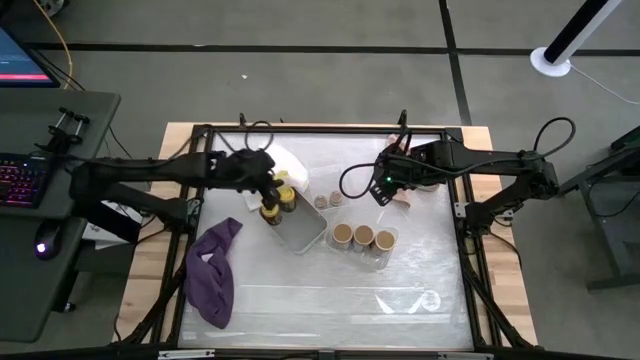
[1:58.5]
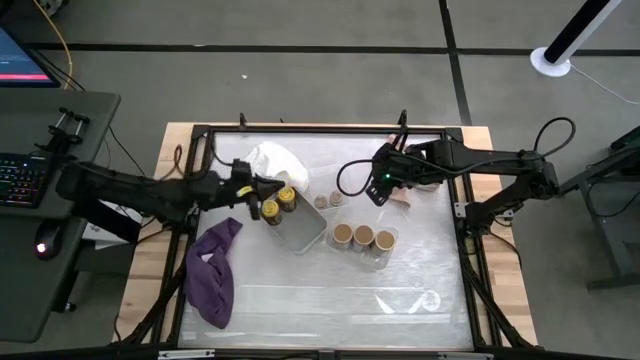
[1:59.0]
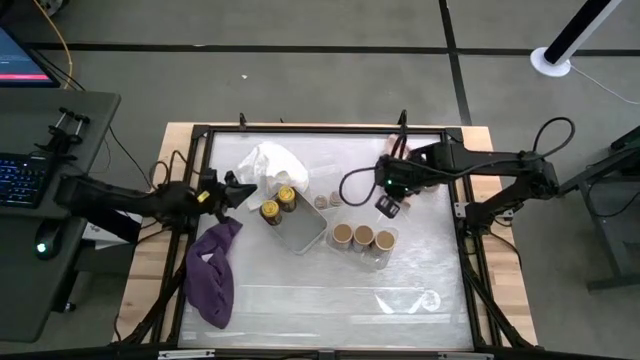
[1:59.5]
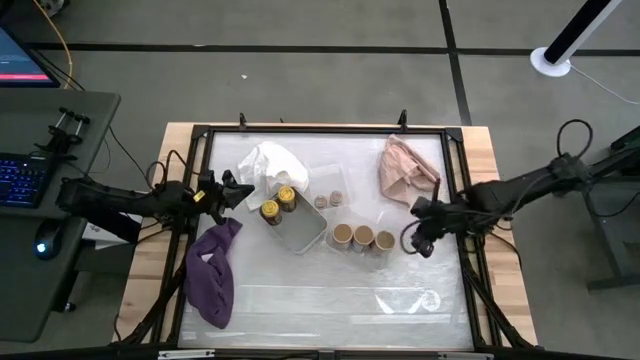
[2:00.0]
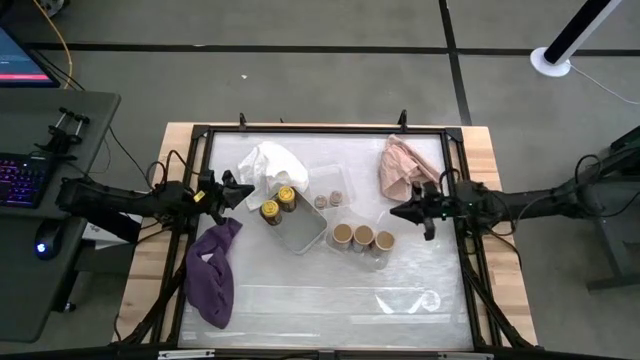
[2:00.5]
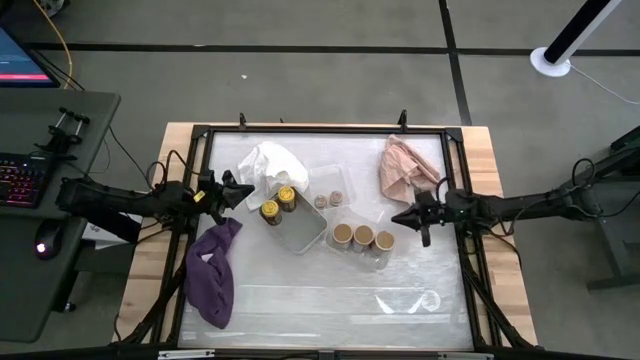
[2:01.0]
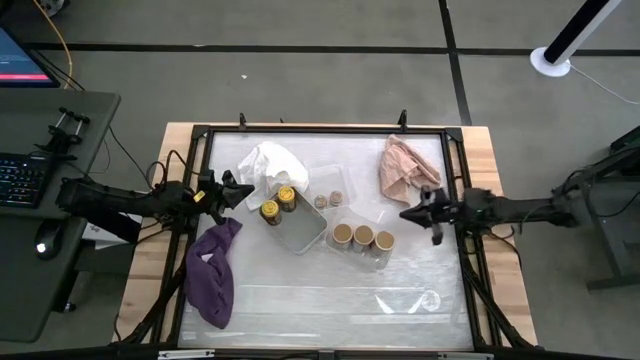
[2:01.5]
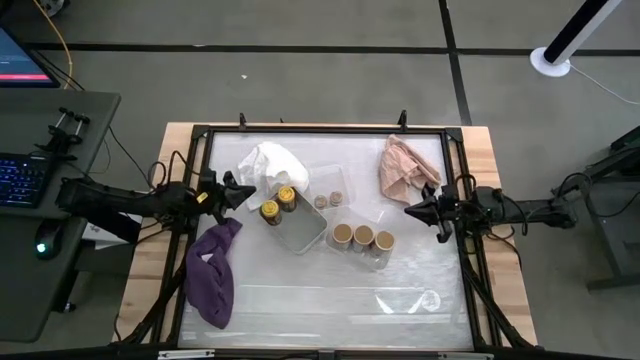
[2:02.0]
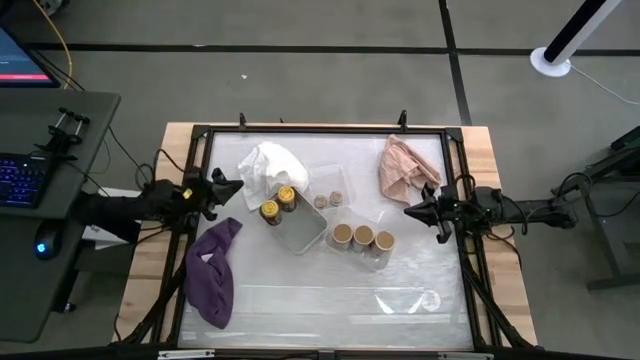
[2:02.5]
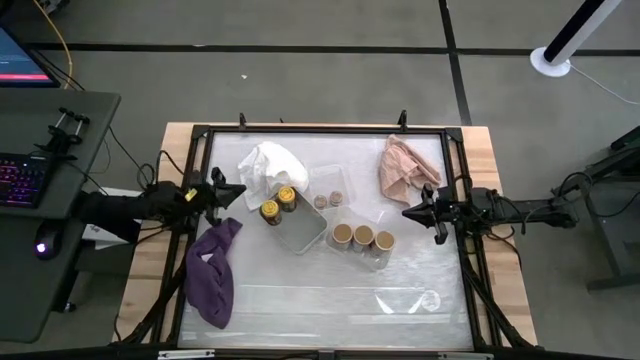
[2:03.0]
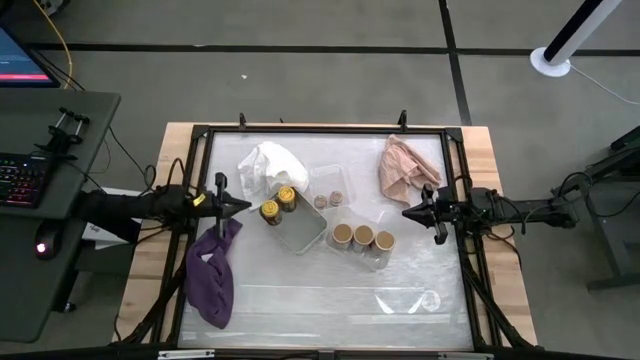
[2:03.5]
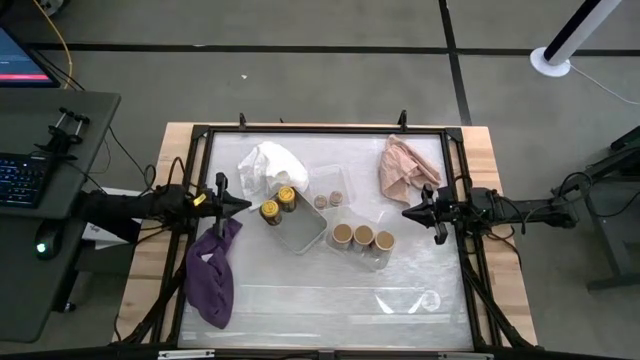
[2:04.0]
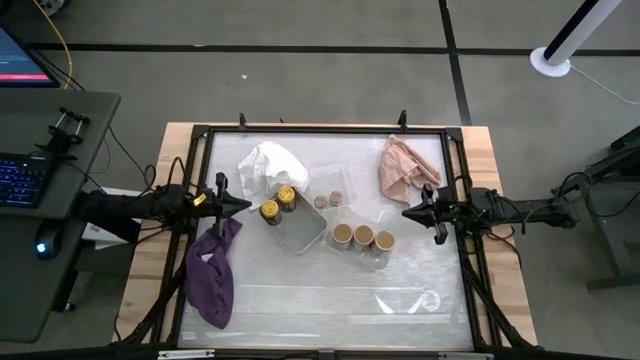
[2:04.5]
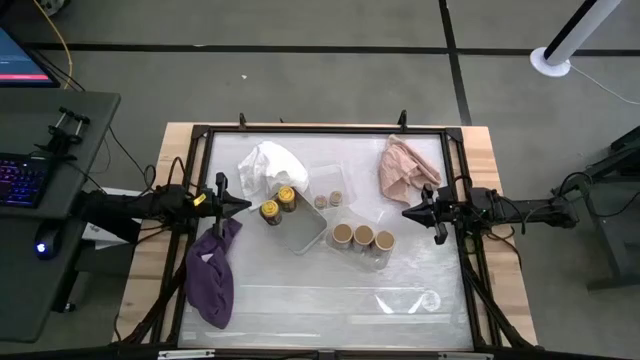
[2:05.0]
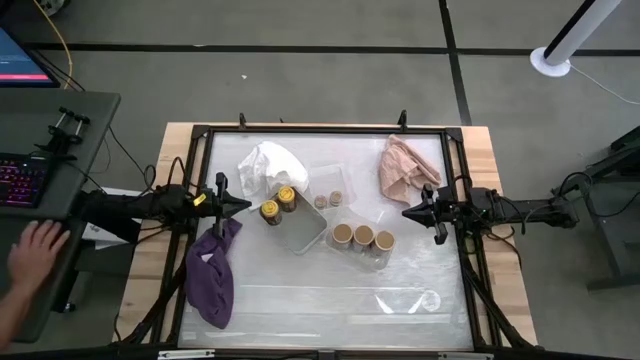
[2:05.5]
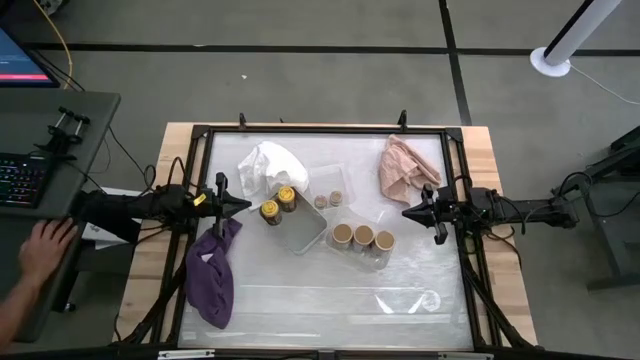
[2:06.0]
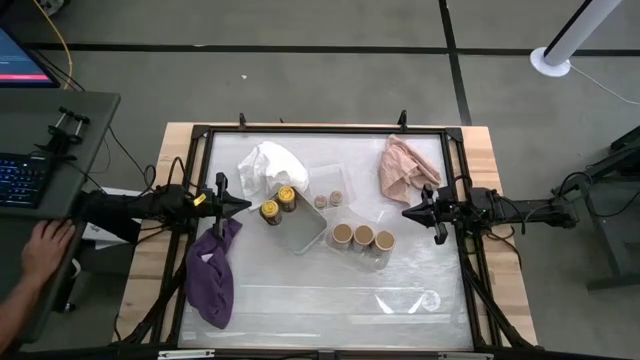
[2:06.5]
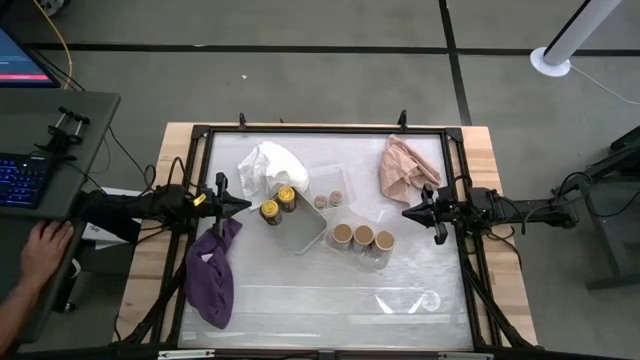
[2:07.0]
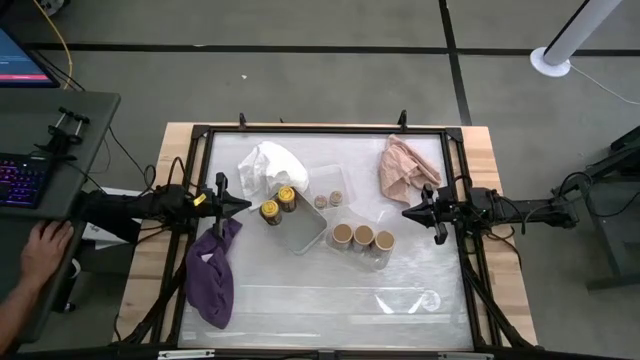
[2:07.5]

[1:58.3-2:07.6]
Task: Sort spices by type
Return to Home Position

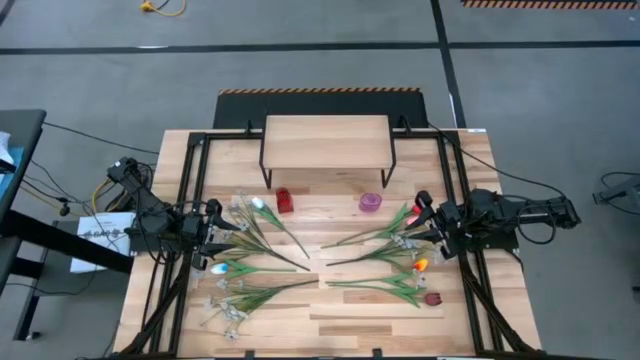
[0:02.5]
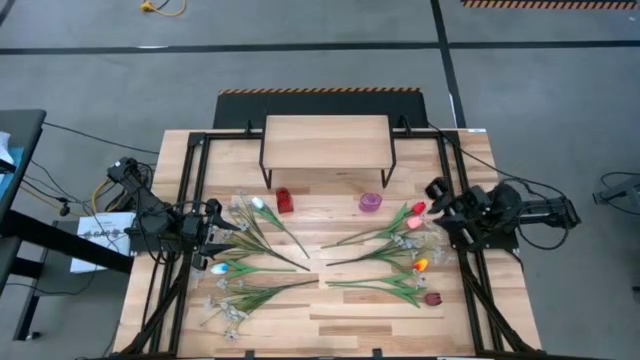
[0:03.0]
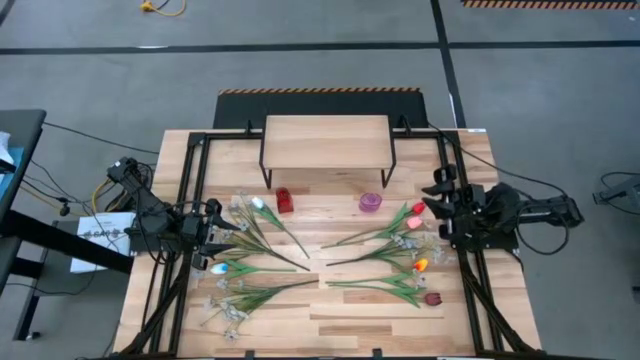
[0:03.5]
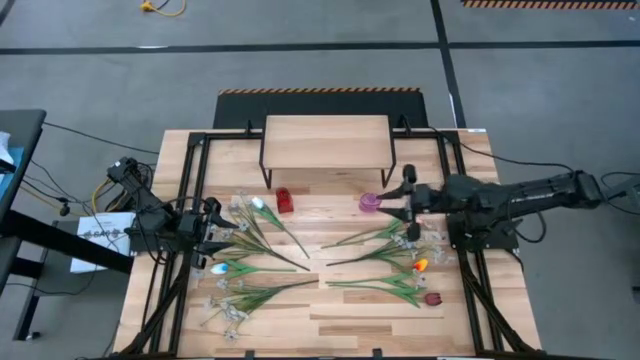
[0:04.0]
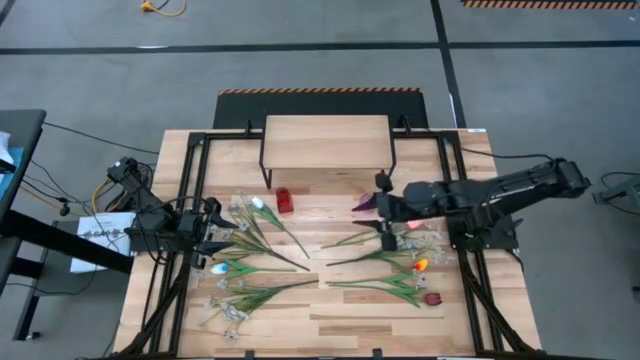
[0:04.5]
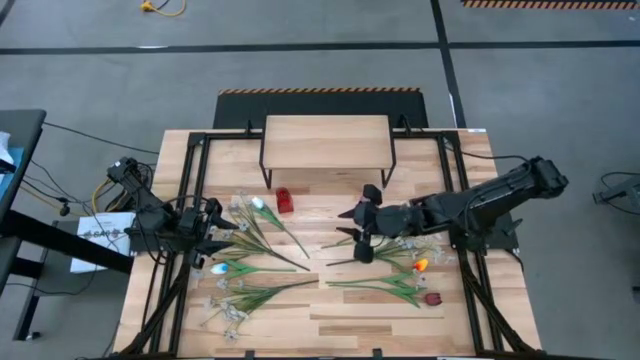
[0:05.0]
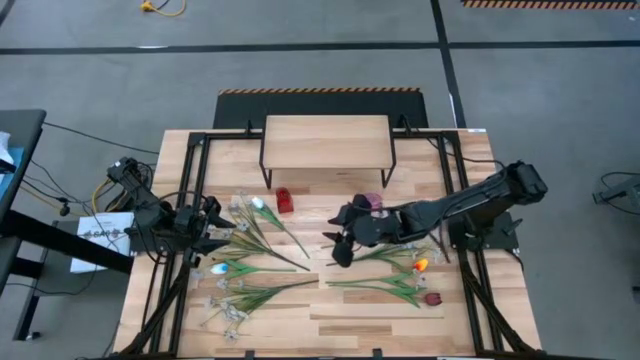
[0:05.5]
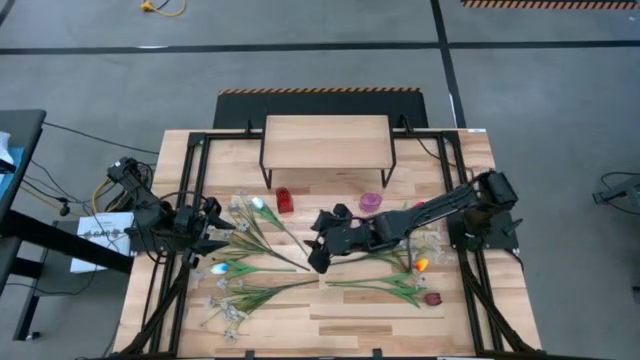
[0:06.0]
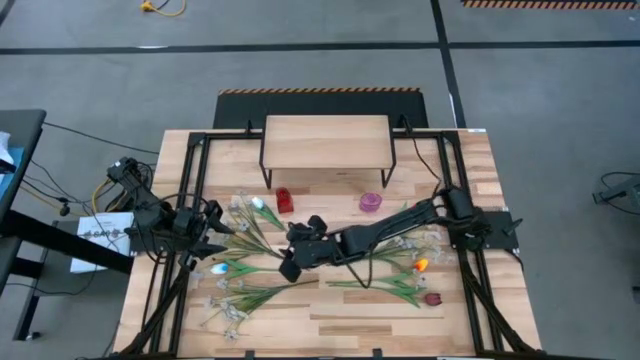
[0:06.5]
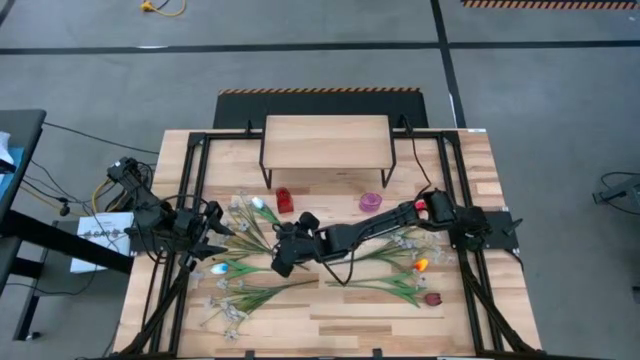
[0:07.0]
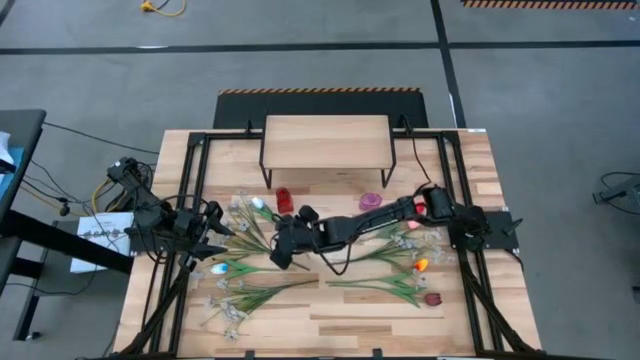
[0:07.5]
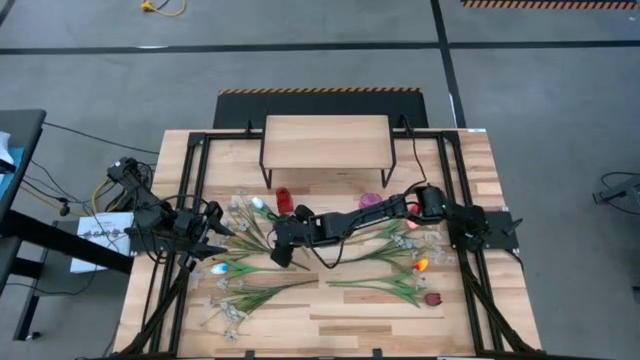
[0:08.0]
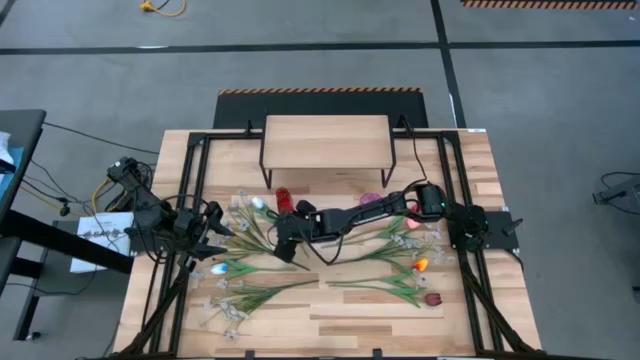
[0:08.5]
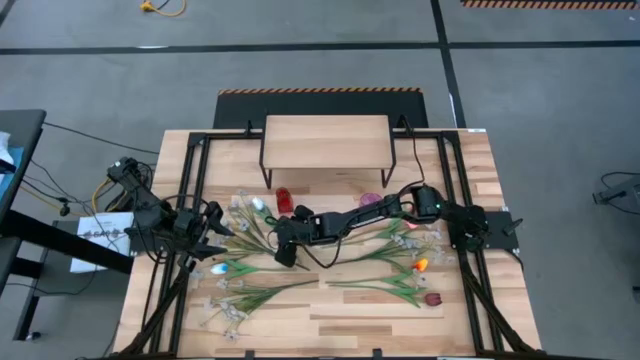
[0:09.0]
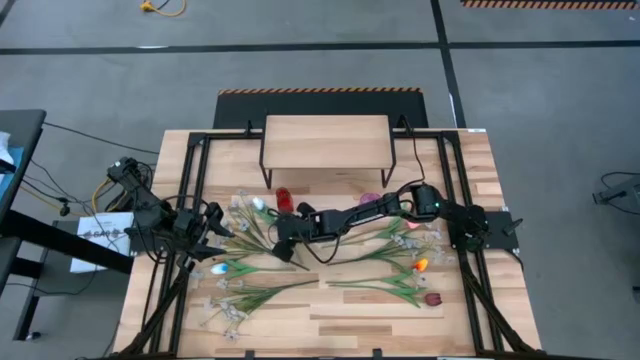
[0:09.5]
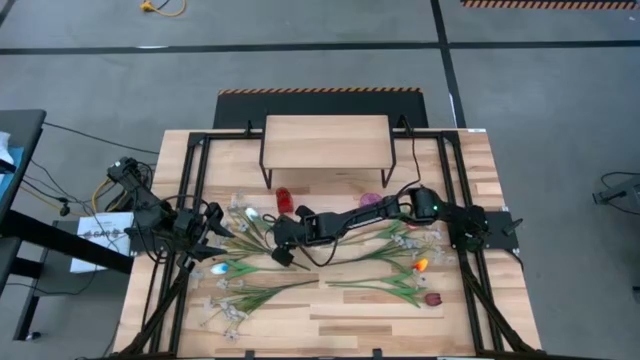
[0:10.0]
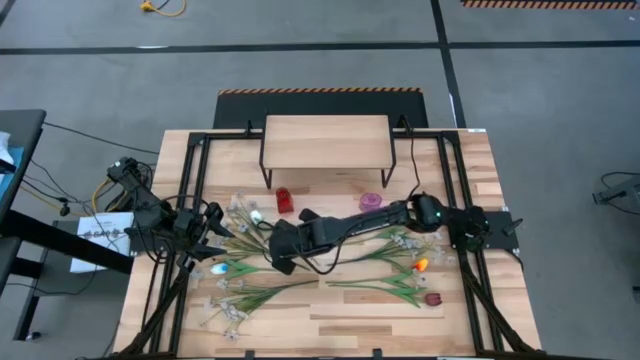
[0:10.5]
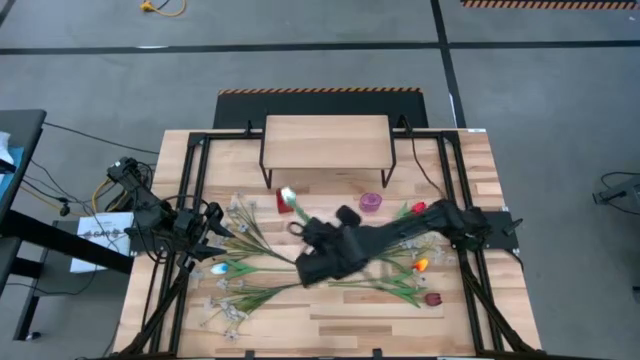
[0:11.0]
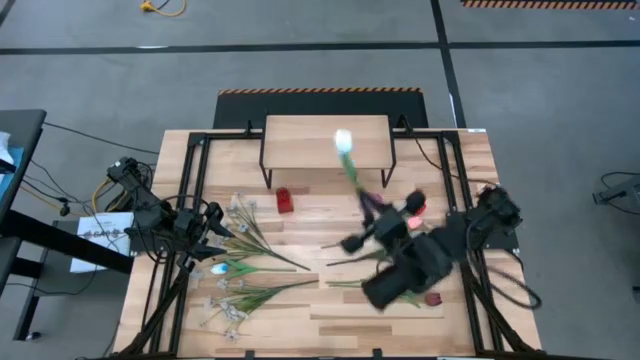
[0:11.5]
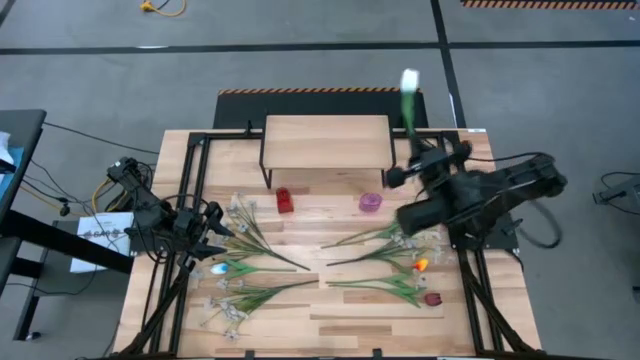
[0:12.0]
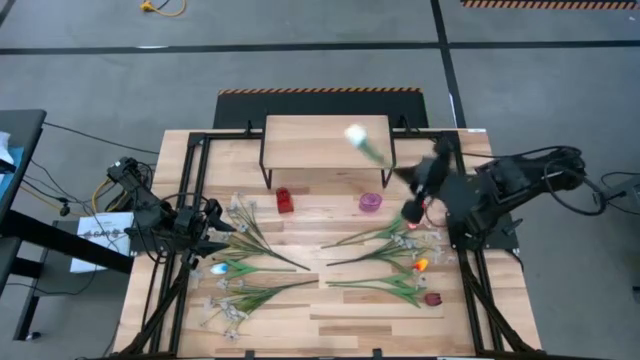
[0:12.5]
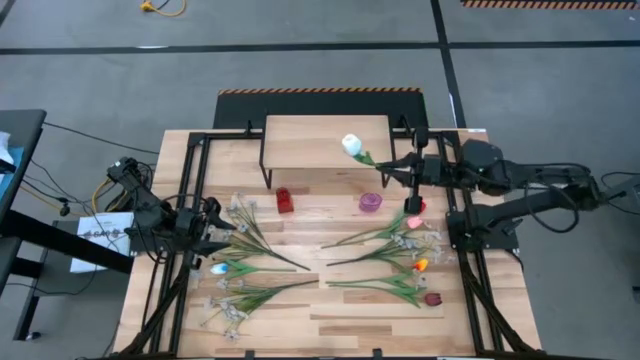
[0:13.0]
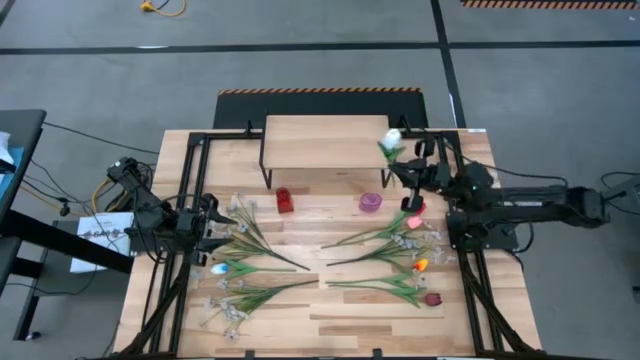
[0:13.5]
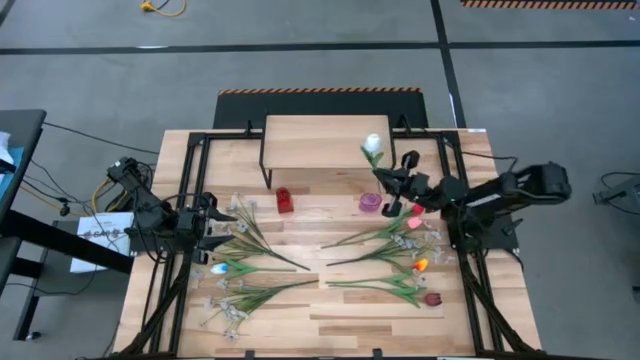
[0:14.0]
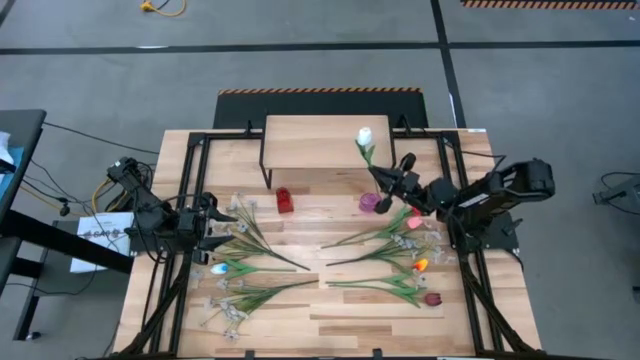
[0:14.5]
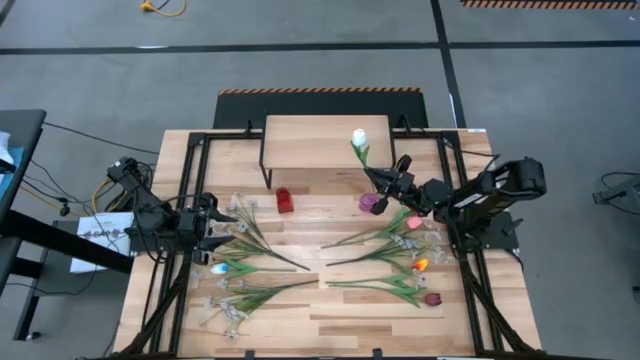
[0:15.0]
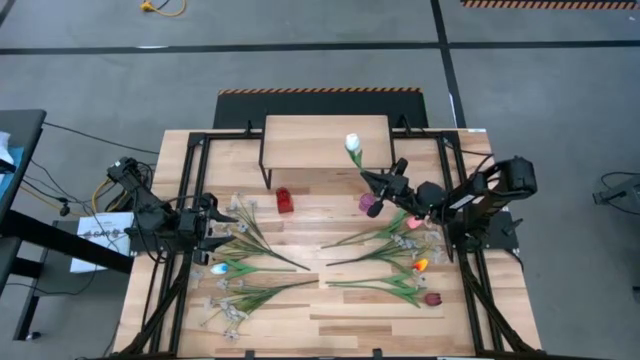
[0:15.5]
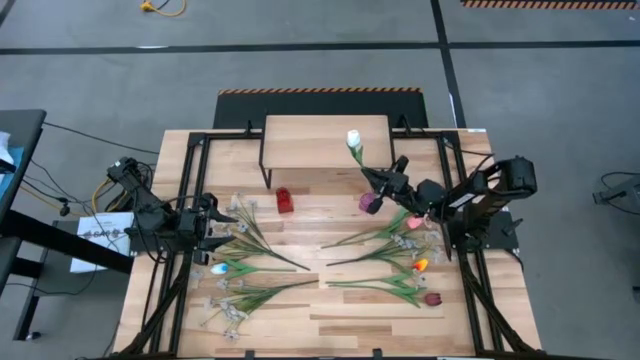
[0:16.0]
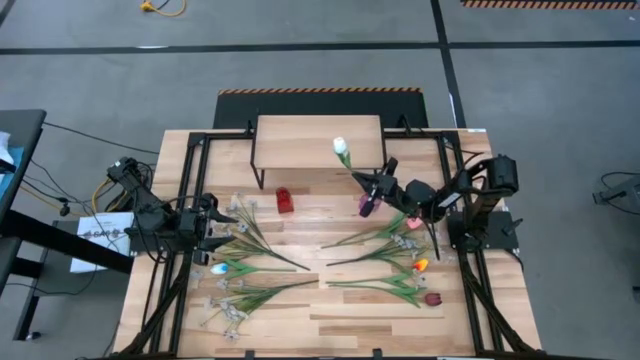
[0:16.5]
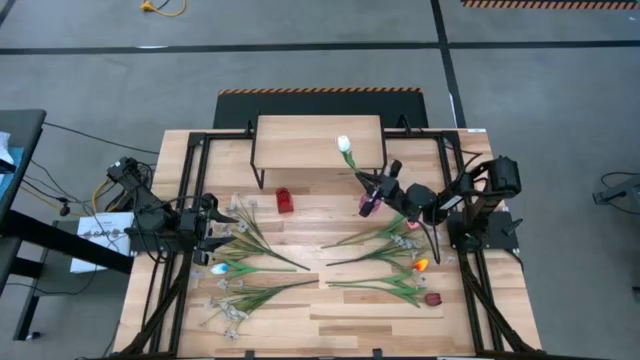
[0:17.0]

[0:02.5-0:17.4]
Task: Pick and place flowers into a vace then onto a shelf
Put the top white tulip into the pink vase
